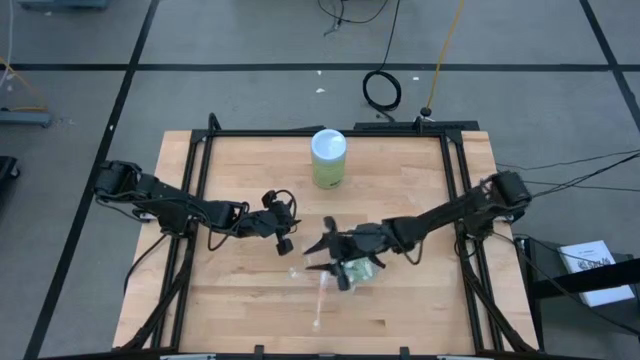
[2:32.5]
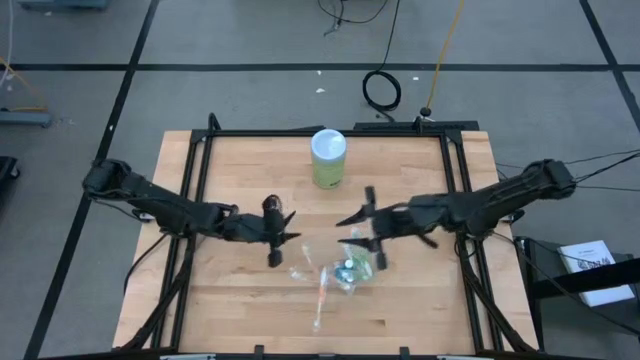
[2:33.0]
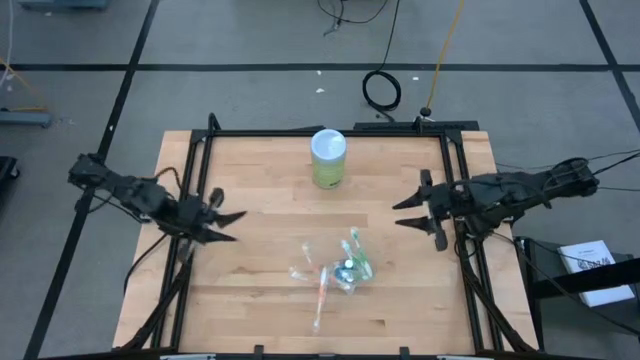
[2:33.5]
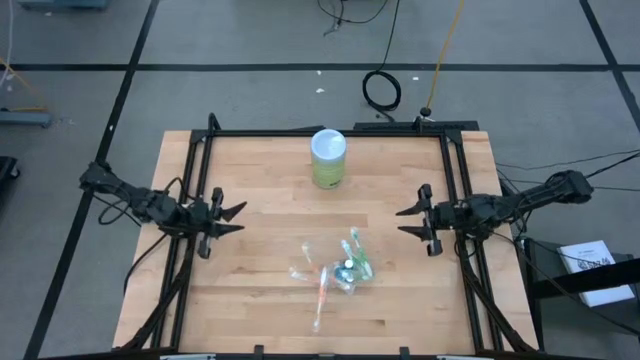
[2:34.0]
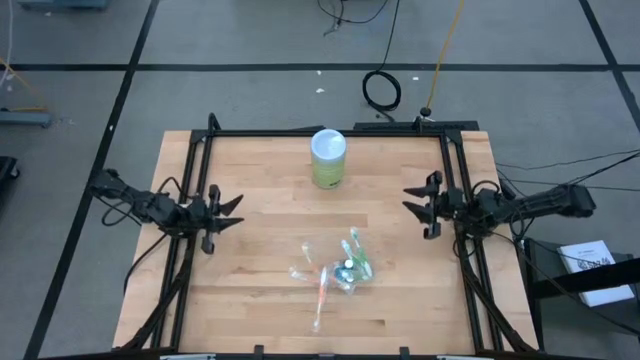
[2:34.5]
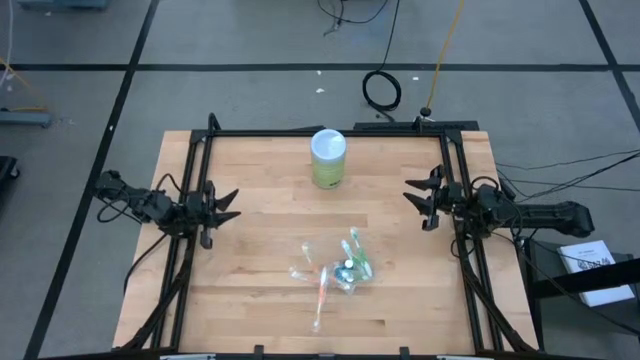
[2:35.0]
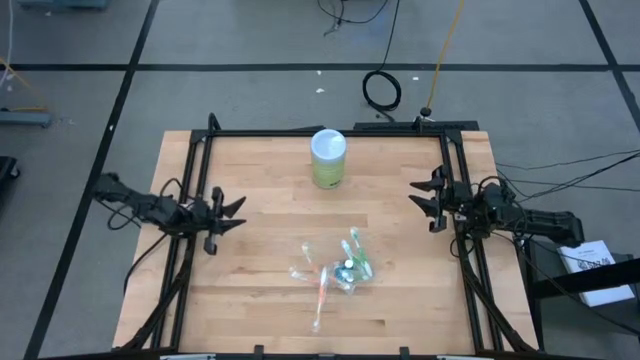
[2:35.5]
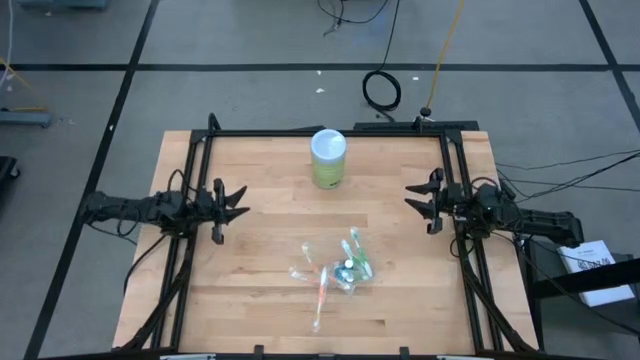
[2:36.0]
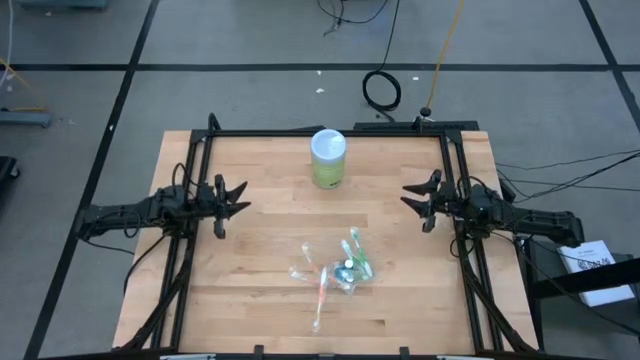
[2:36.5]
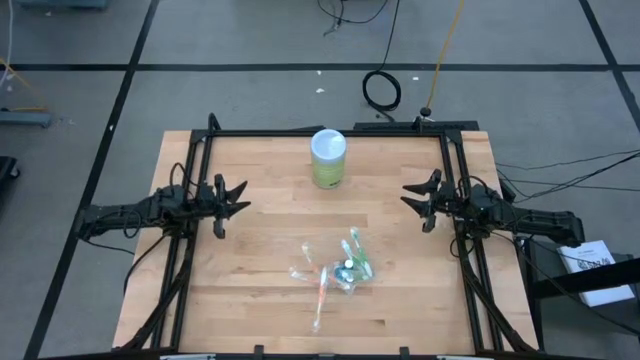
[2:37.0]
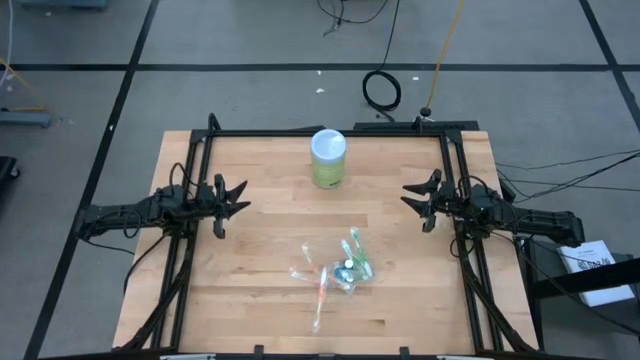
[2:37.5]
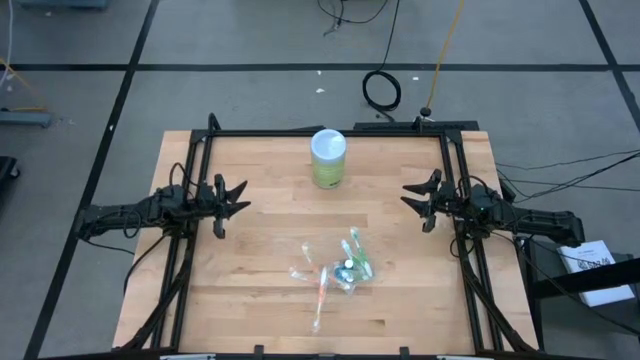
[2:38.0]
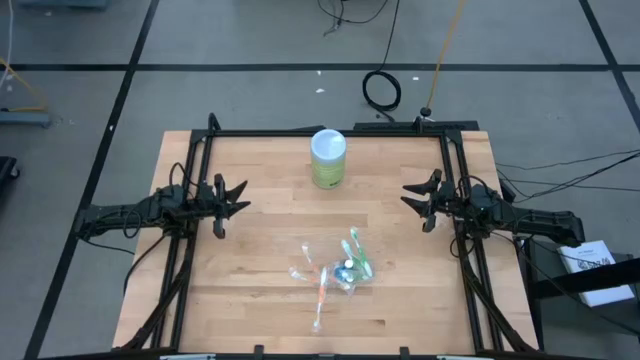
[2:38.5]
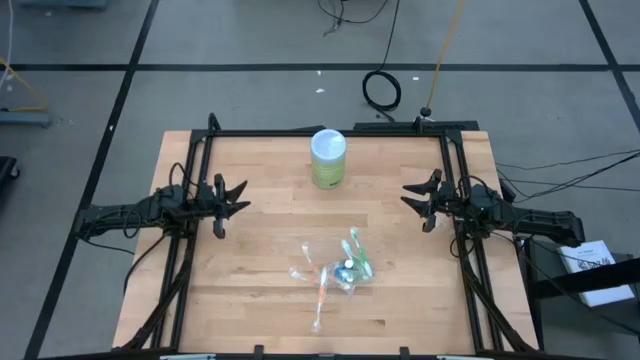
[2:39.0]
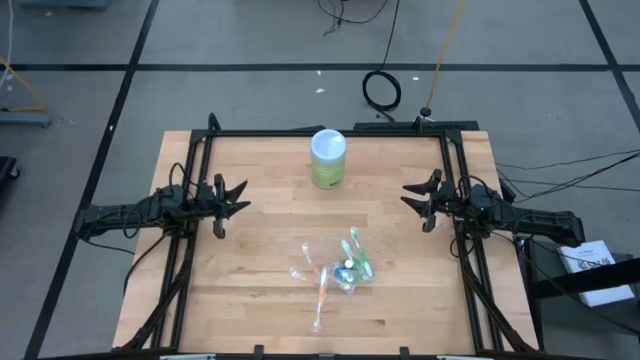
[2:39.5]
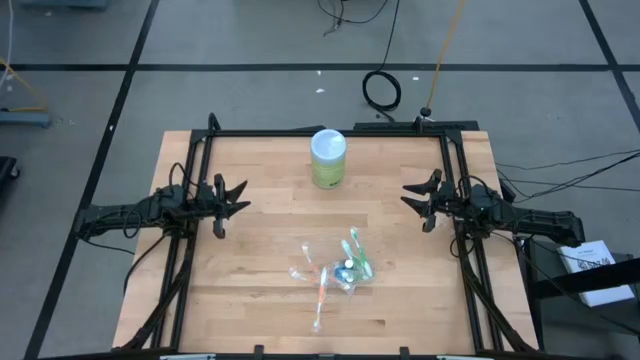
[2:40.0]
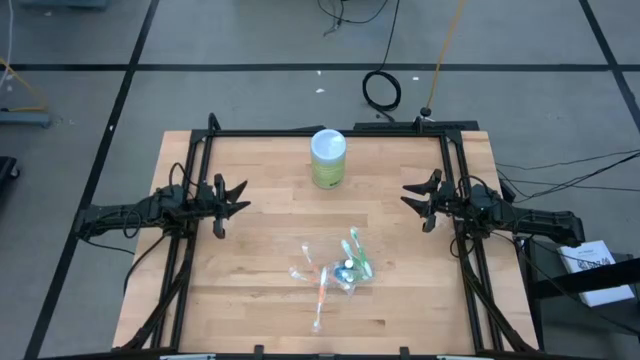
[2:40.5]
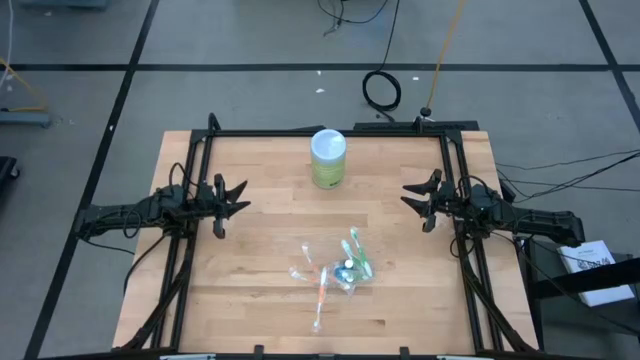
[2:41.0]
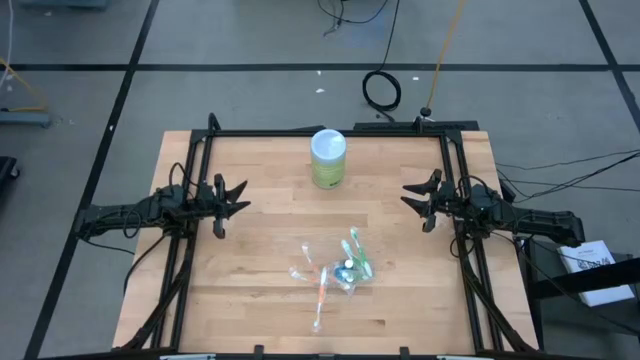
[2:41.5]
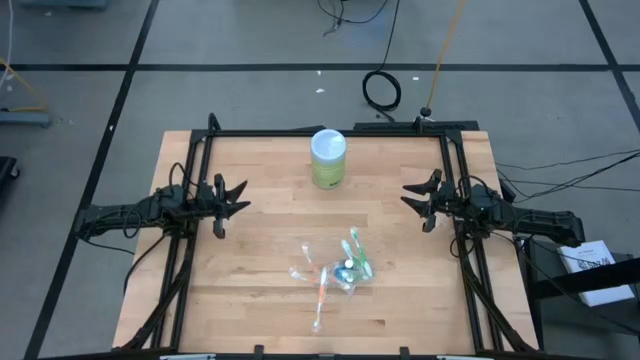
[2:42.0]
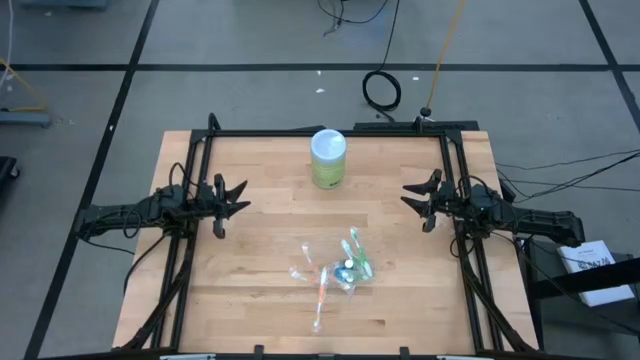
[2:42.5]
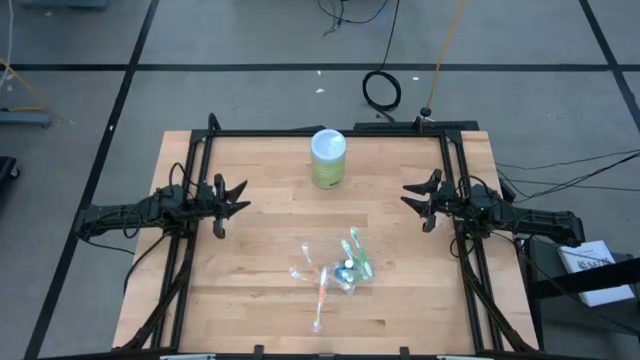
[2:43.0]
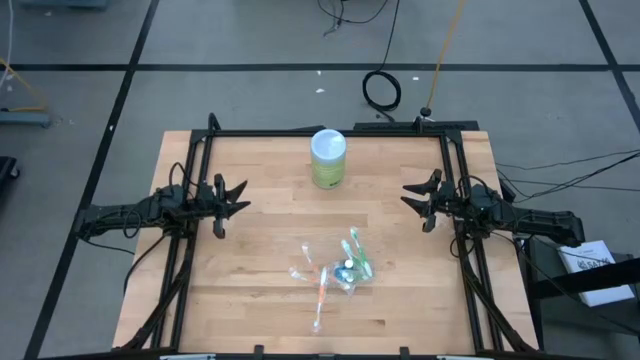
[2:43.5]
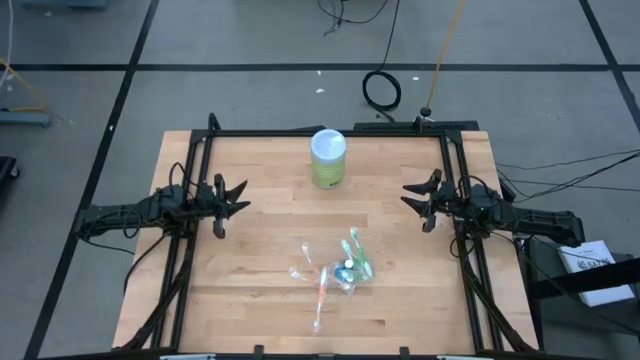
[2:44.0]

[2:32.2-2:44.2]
Task: Pick & Place toothbrushing station
Return to Home Position

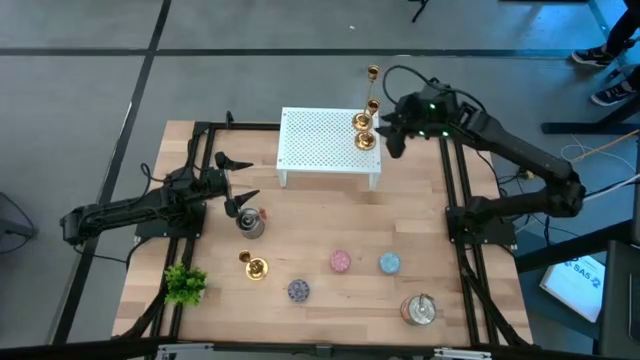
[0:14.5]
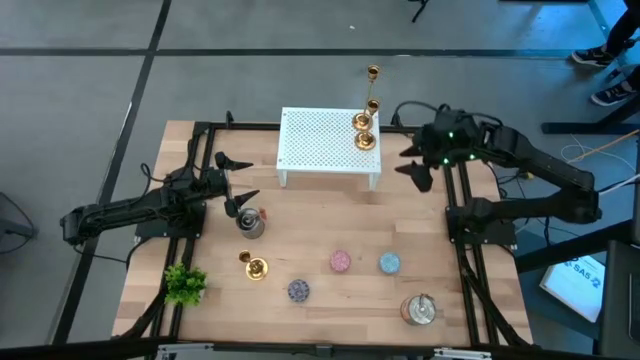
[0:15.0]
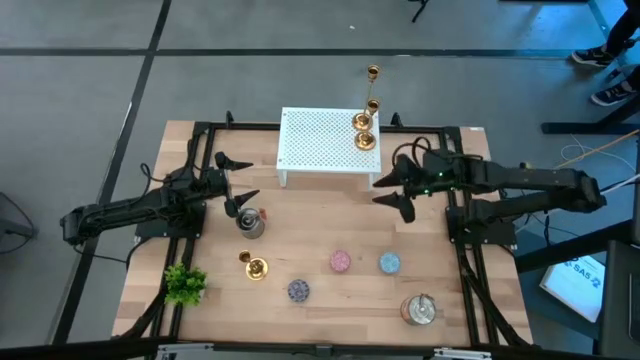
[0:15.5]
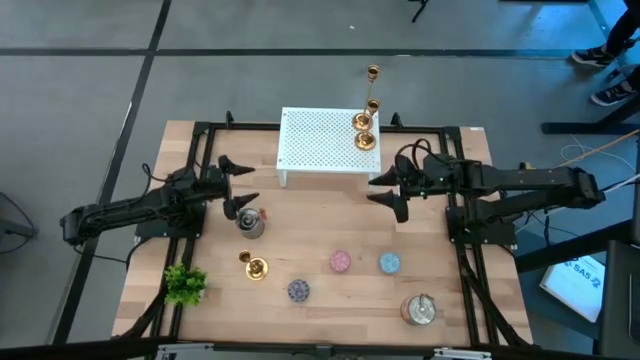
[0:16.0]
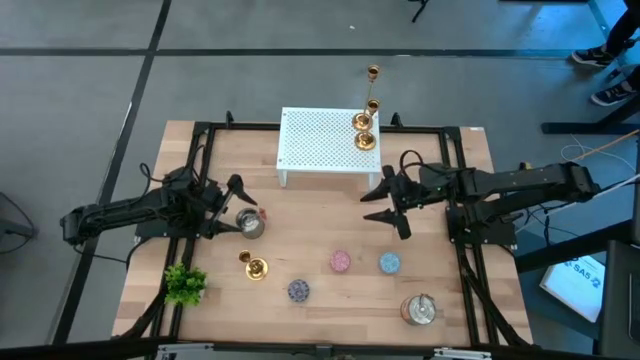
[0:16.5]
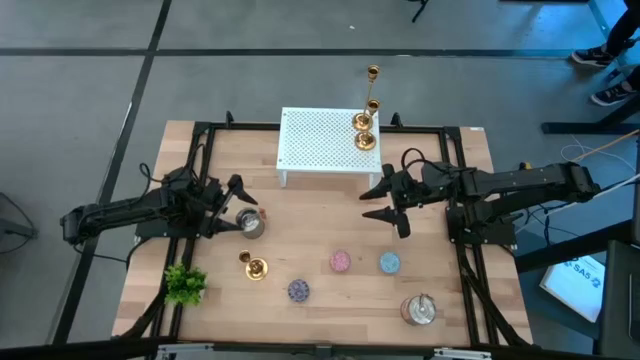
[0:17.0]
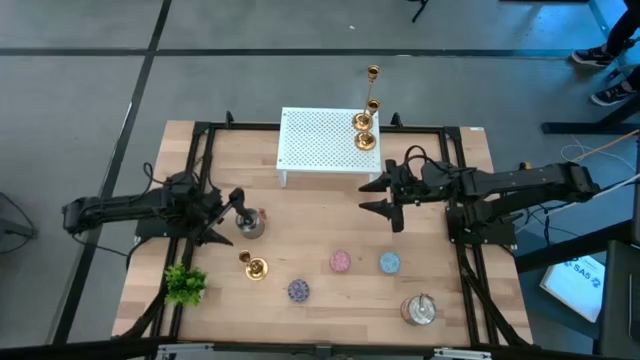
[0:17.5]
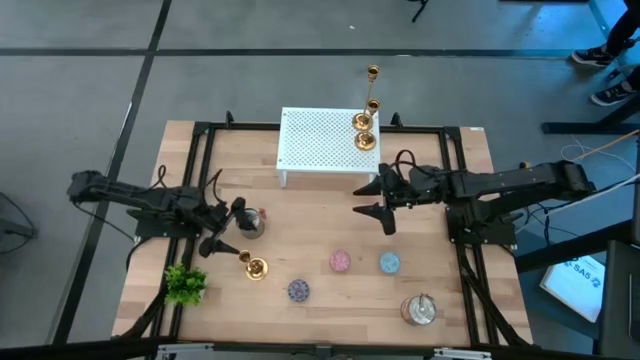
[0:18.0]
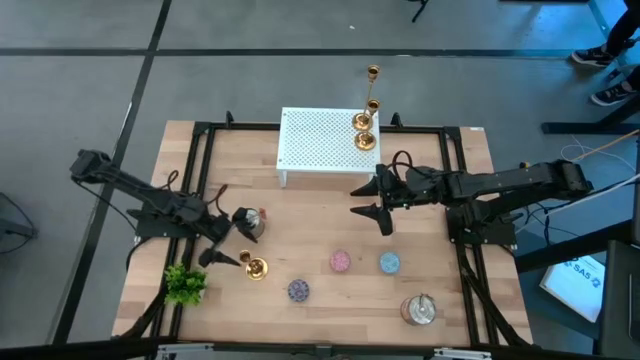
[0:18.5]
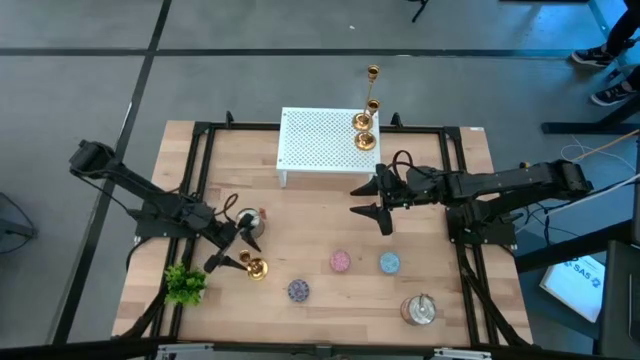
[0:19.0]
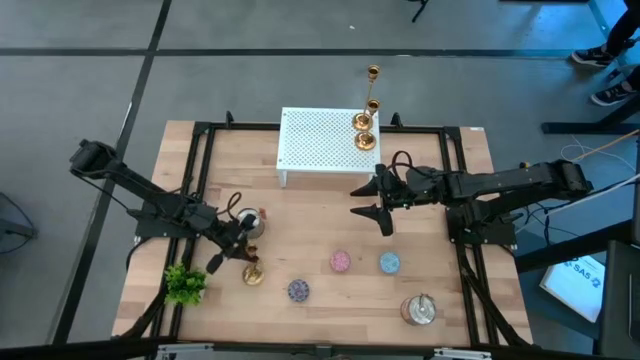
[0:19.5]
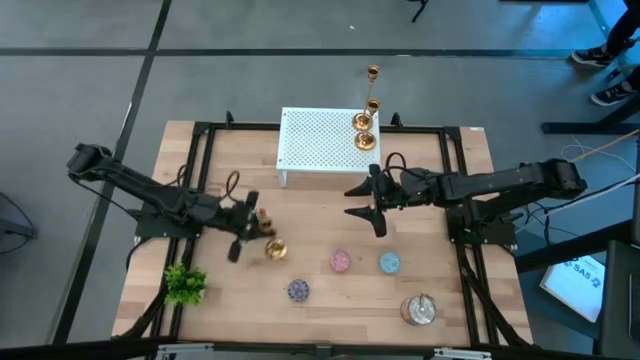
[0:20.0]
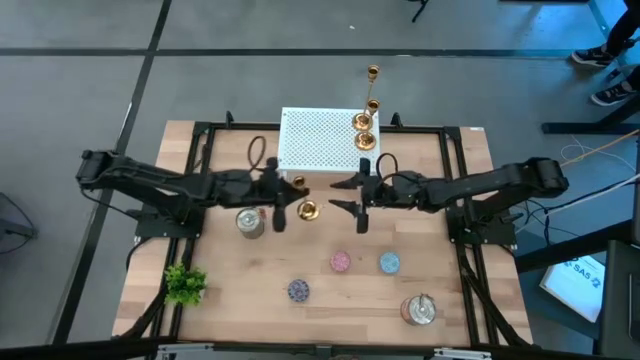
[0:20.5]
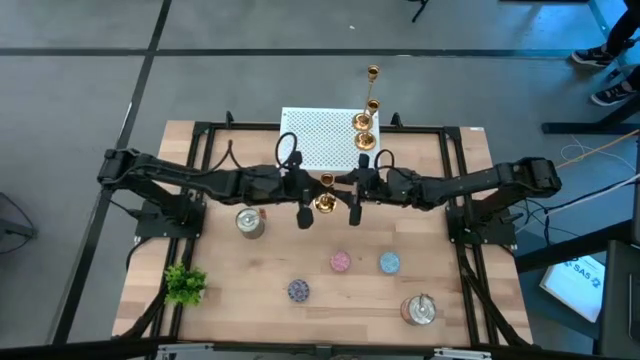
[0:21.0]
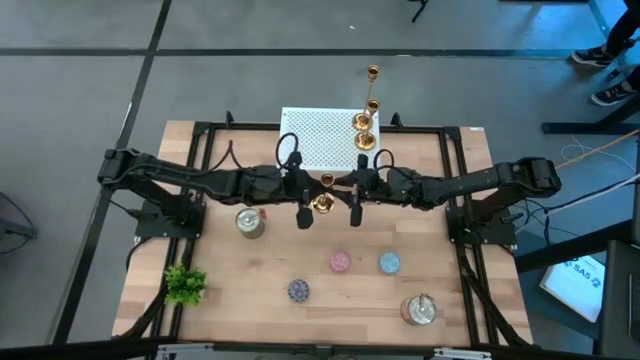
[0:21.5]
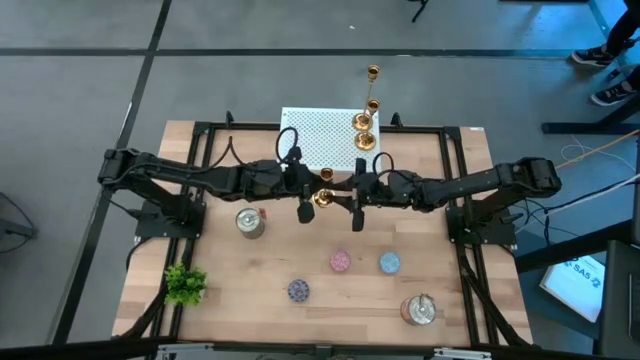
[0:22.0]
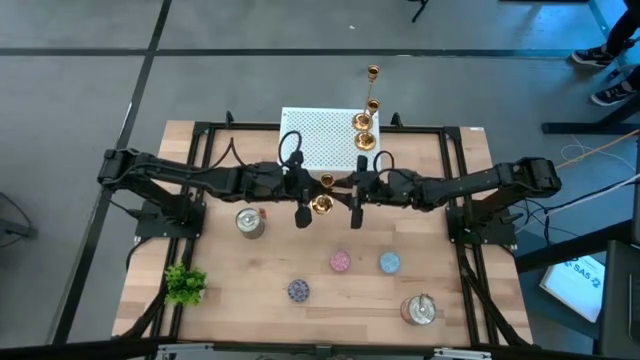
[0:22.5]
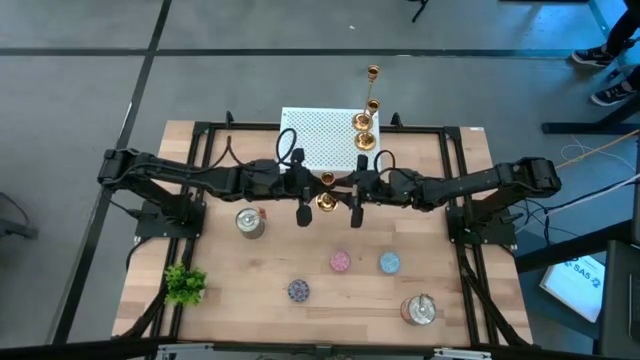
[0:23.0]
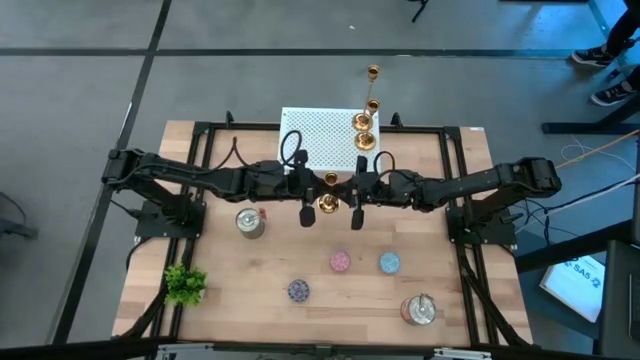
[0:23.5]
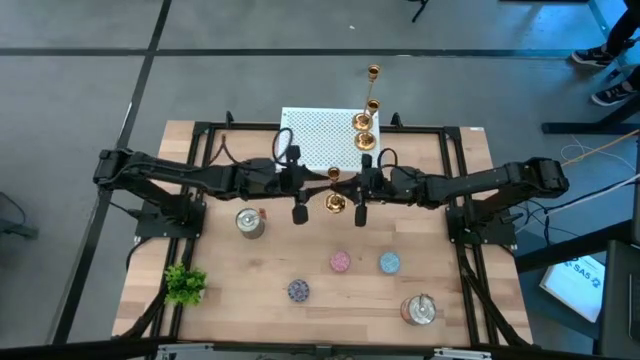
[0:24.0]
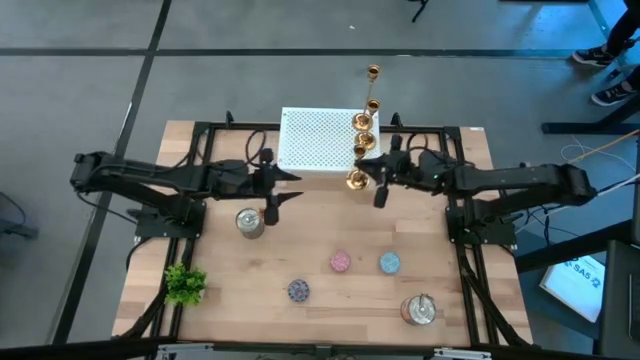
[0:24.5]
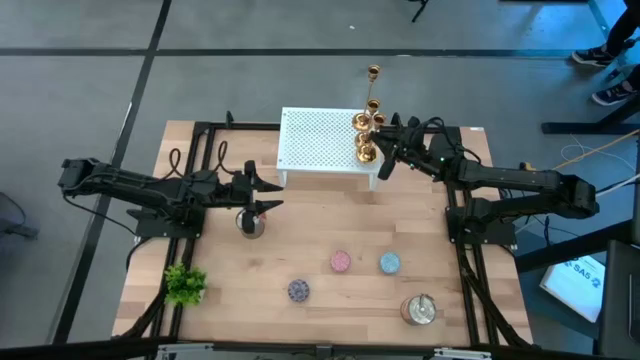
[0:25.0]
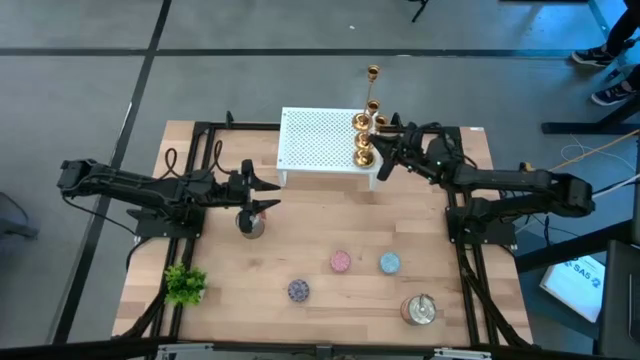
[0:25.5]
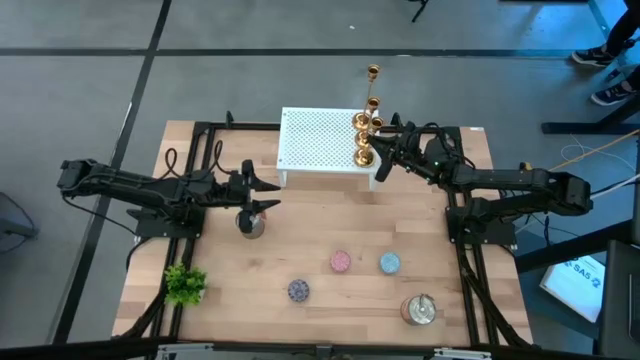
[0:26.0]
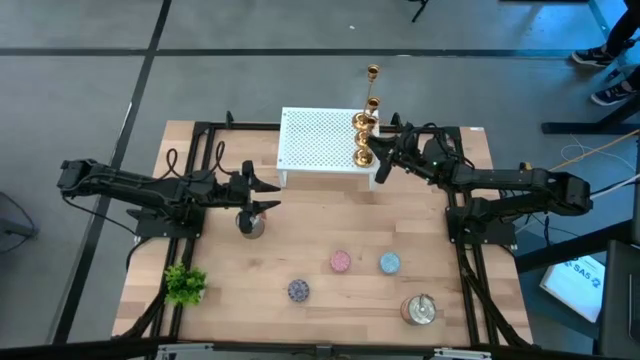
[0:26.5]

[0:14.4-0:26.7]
Task: Pick & Place candle stick holders
Align the gold candle holder with the gold candle holders on the shelf
